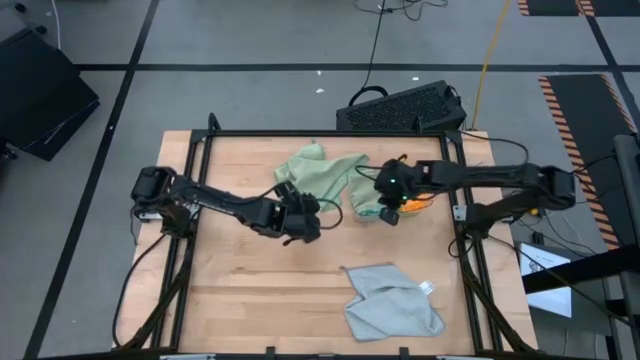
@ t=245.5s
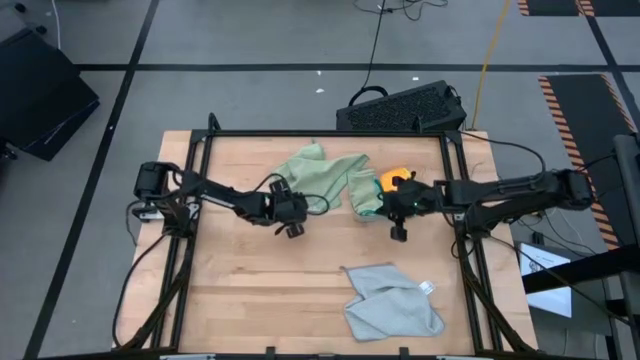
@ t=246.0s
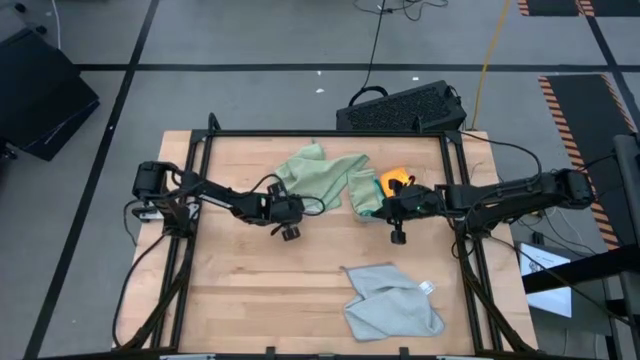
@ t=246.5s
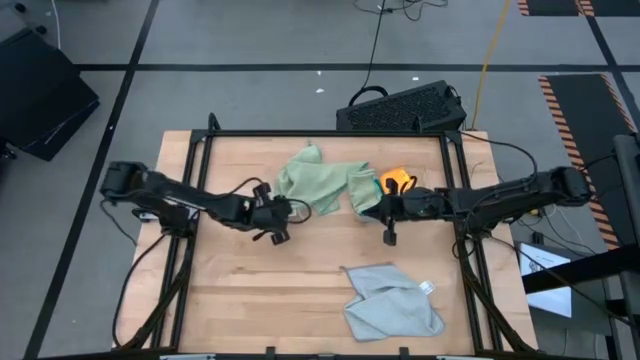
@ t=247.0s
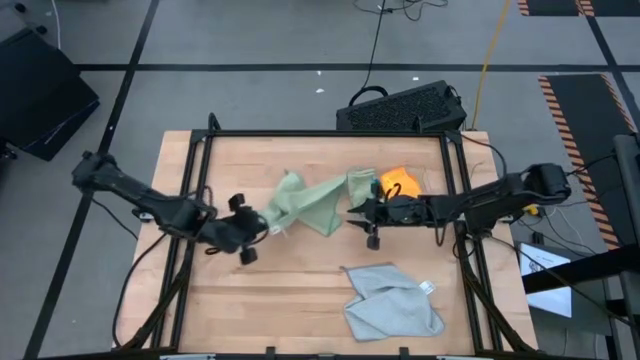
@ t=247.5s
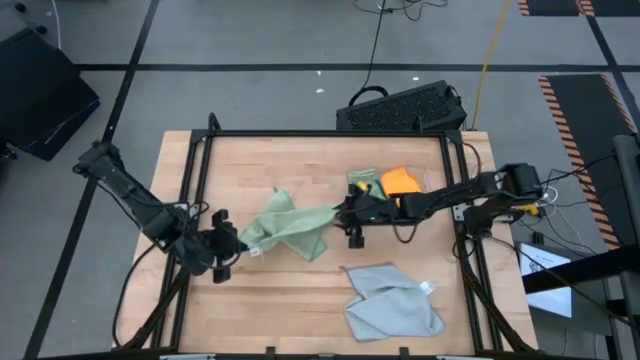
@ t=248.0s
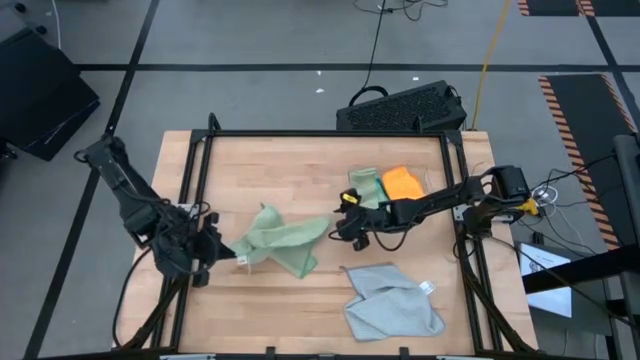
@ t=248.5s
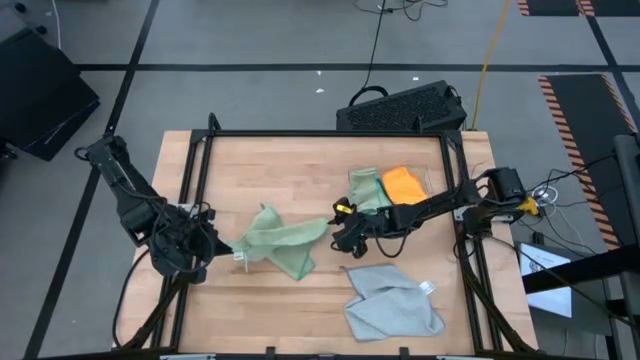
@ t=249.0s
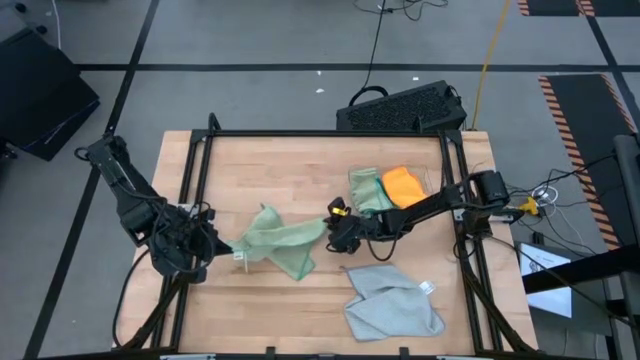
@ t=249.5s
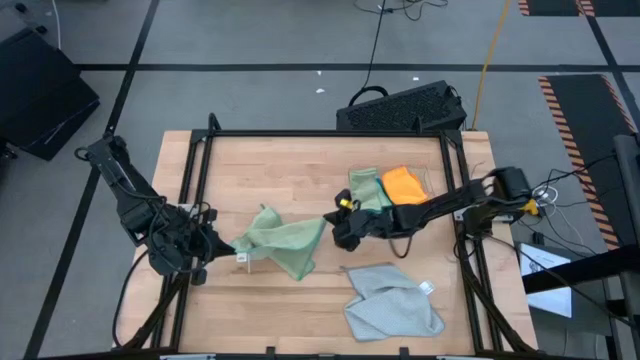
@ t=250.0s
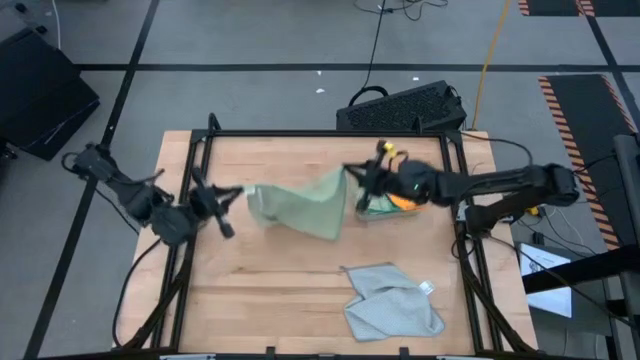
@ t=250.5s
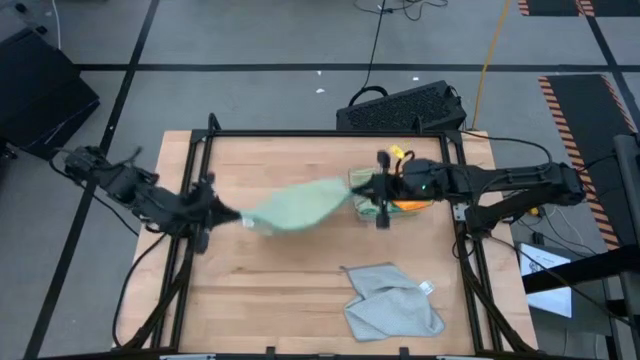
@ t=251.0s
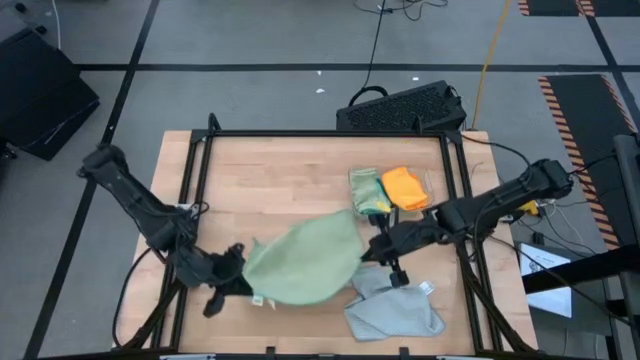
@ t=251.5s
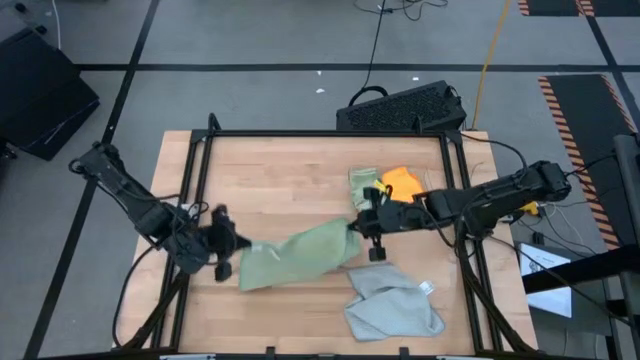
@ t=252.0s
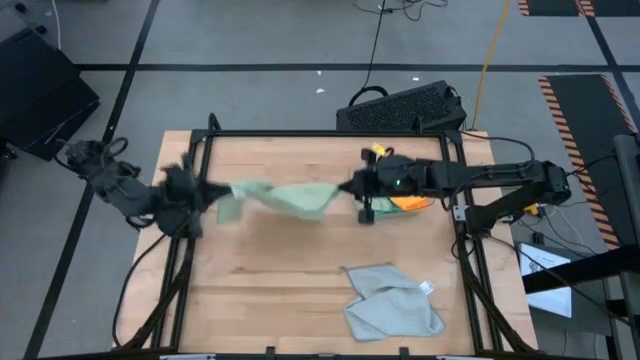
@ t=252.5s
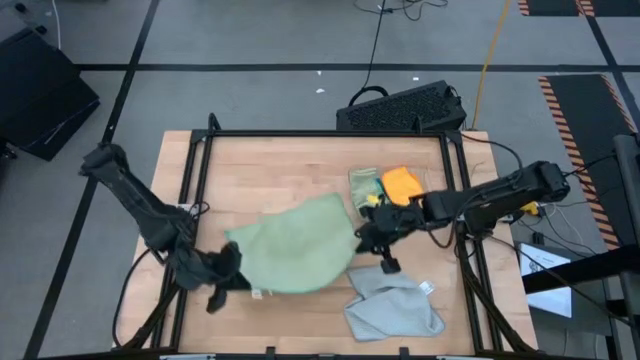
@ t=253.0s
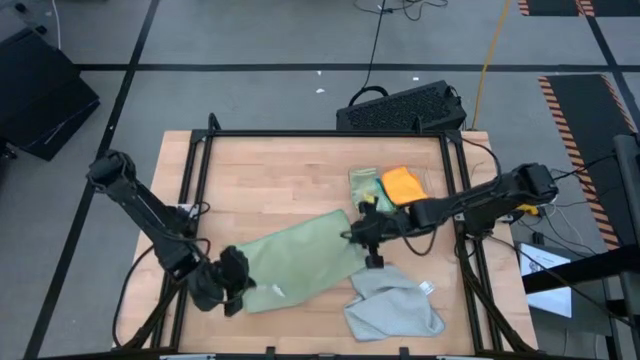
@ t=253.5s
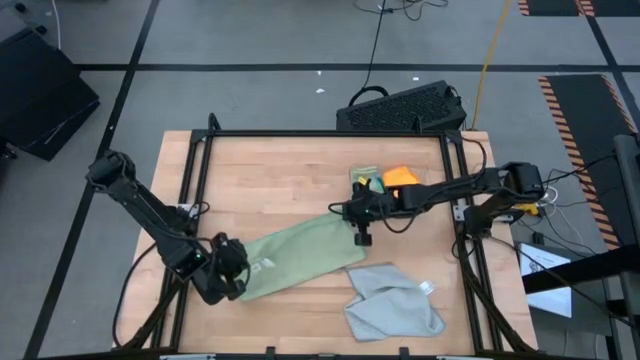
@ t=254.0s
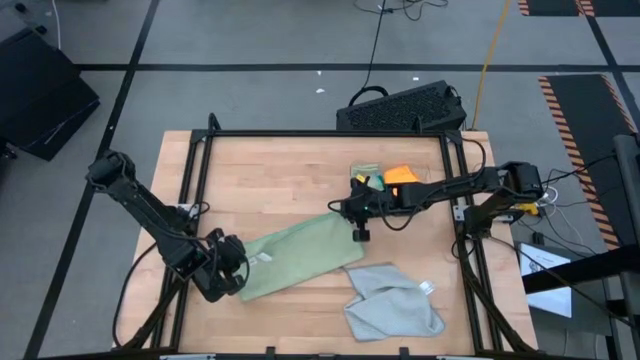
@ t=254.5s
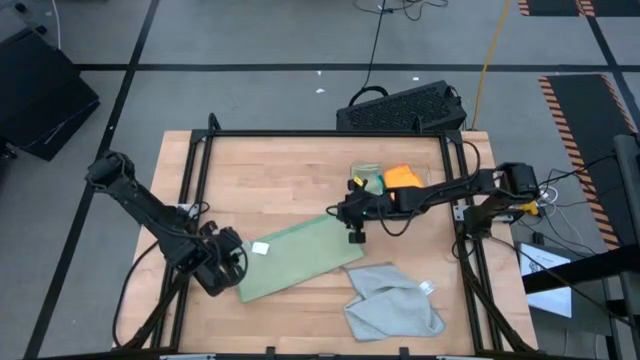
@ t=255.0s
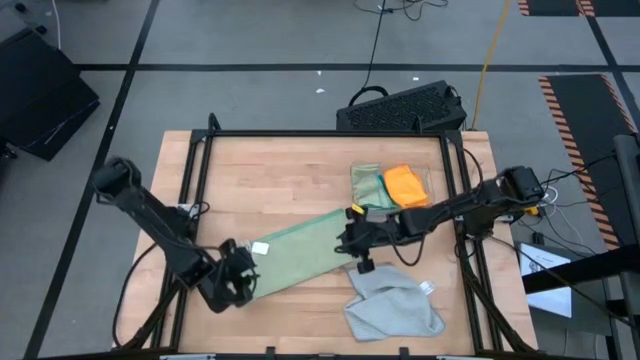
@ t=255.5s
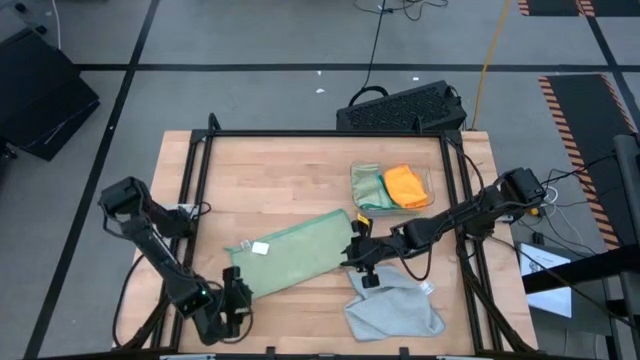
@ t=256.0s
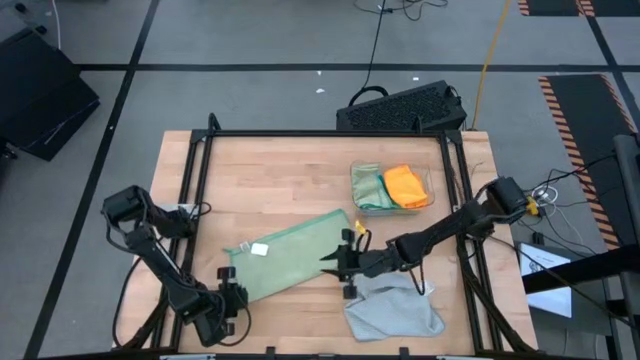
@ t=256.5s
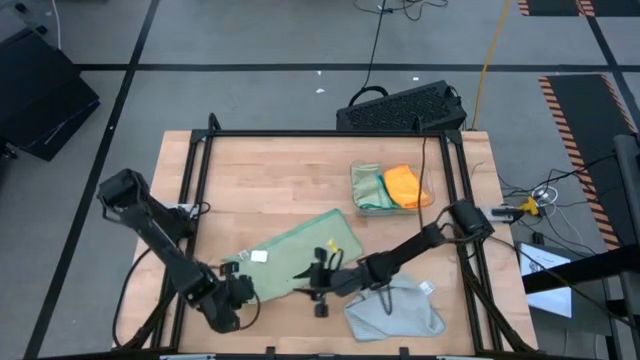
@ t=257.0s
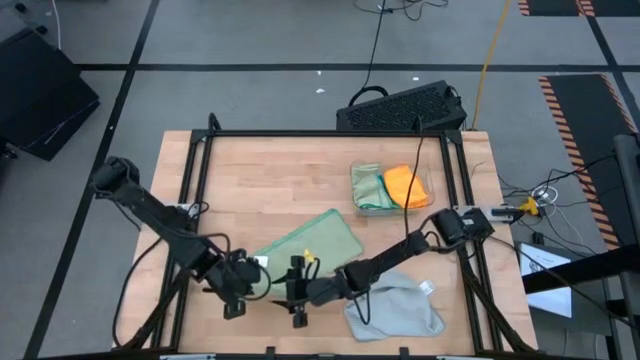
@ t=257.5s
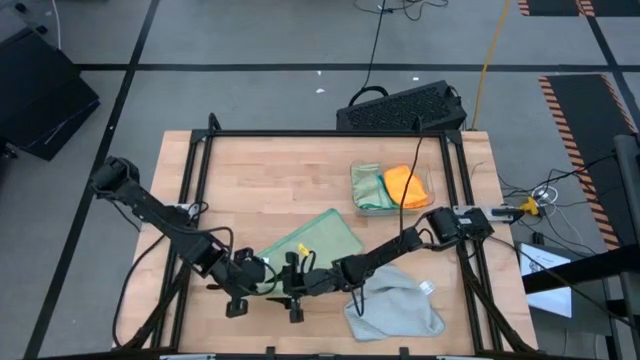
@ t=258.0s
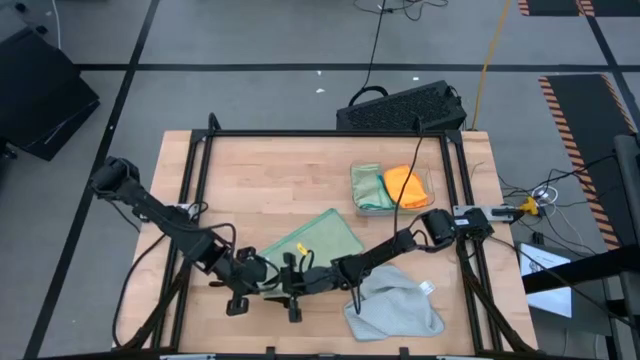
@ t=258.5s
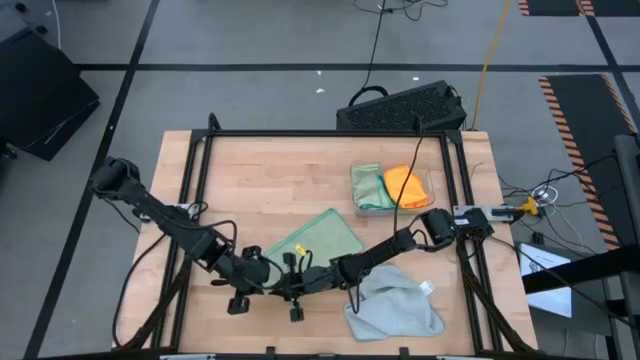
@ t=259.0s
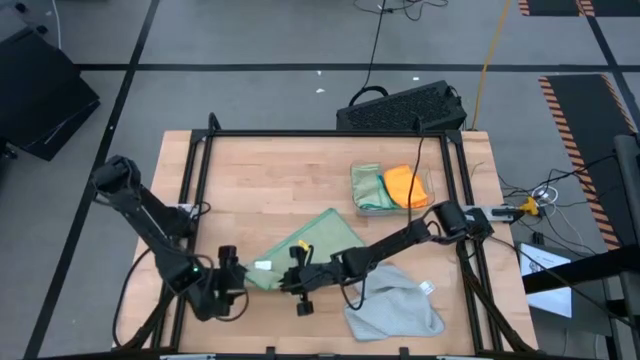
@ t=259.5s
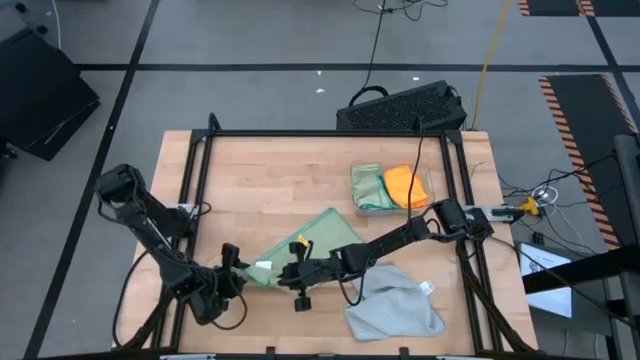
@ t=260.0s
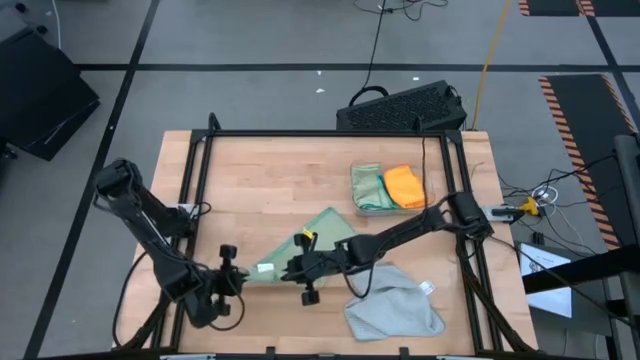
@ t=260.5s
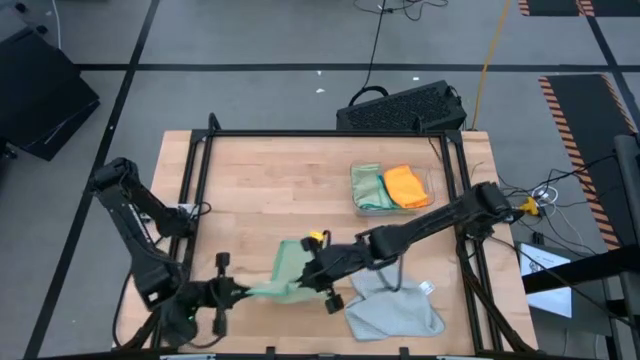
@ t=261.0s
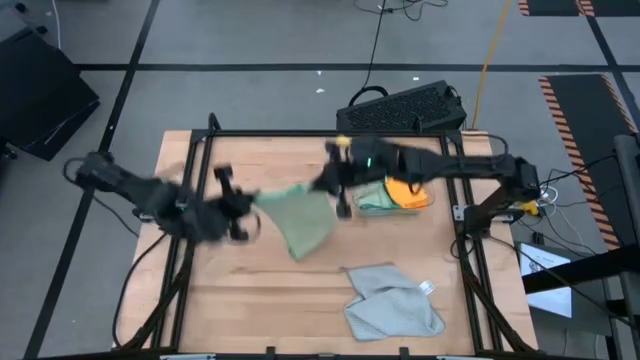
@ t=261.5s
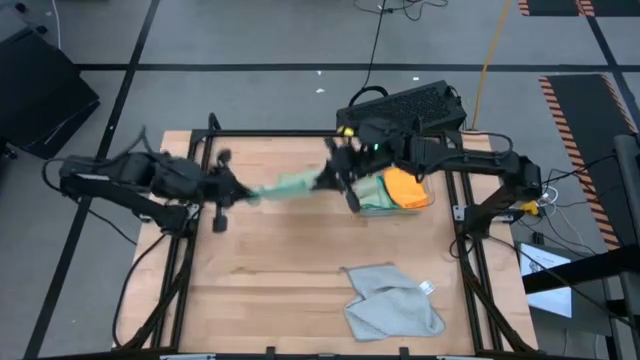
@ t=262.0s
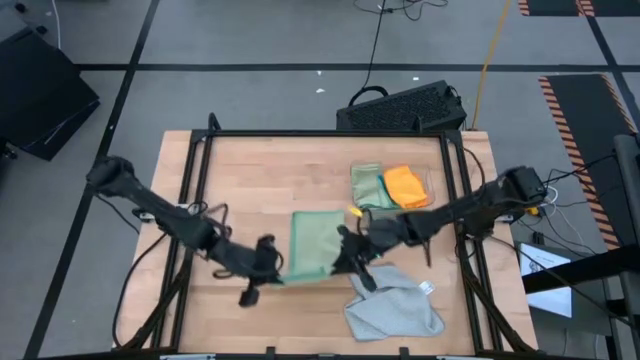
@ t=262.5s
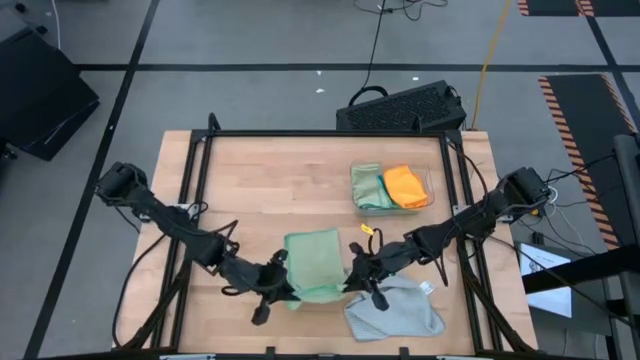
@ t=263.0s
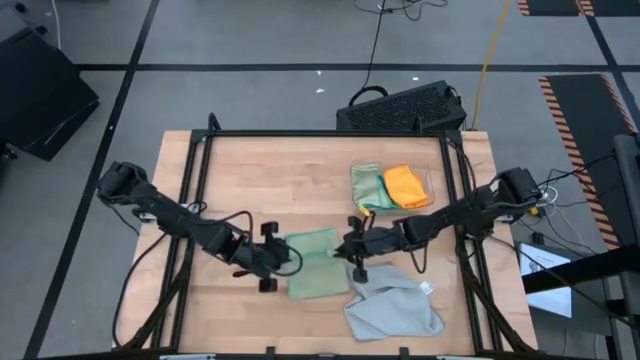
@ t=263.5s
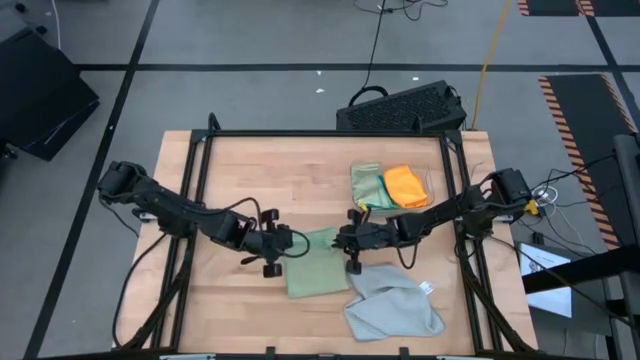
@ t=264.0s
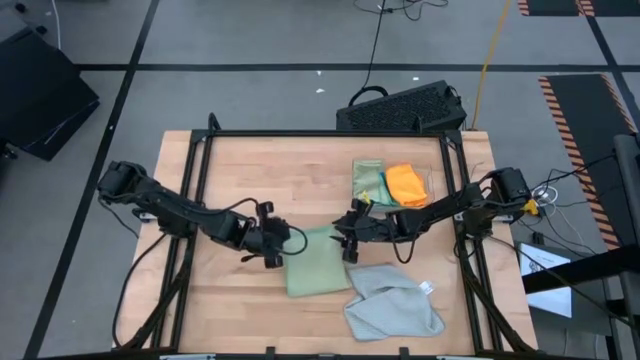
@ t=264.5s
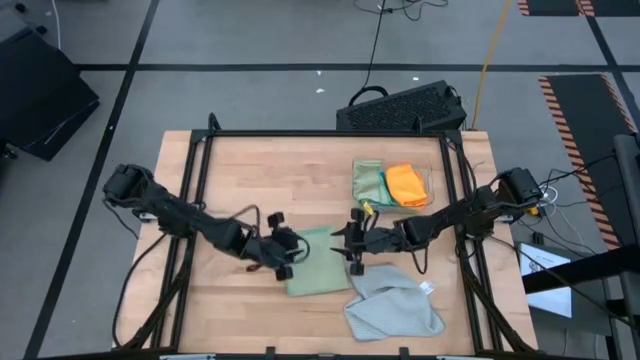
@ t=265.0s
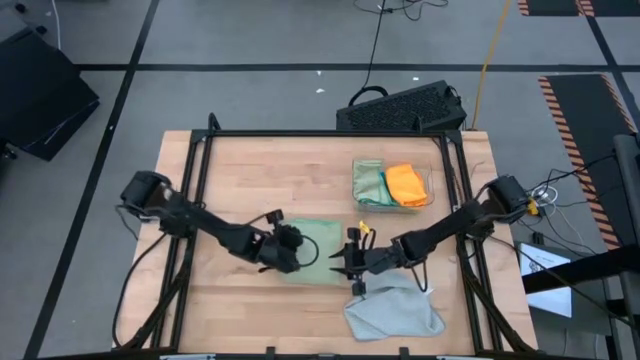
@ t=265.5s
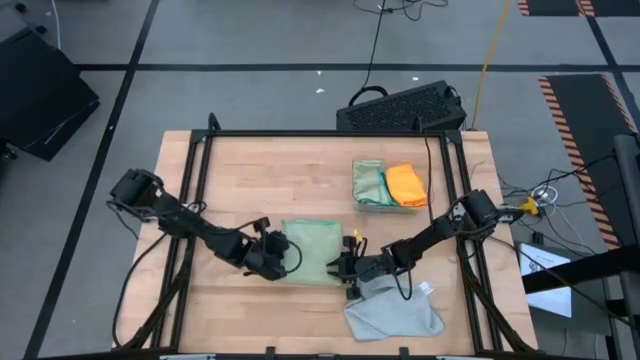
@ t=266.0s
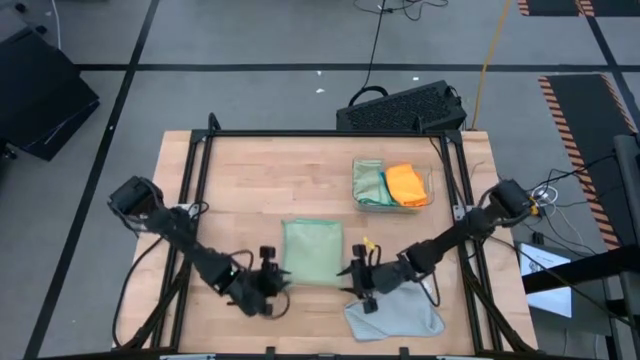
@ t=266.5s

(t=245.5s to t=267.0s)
Task: Fold microfiber towels
Fold the light green microfiber cloth
